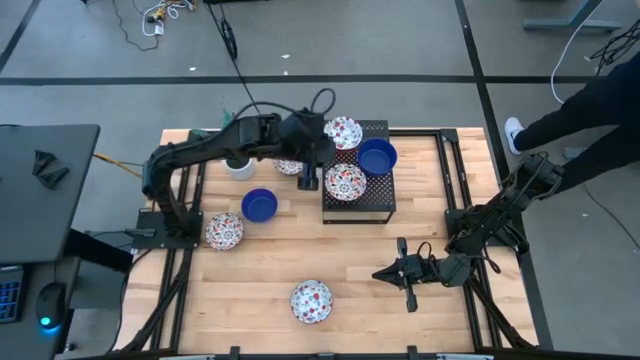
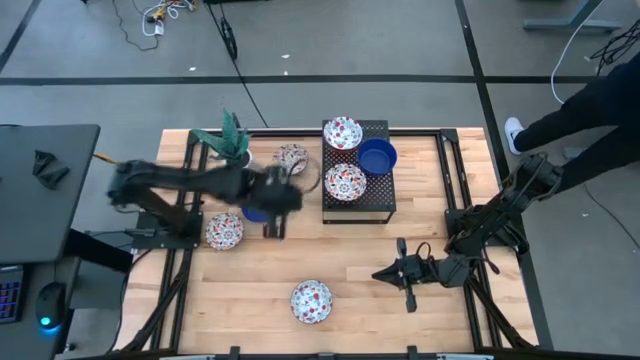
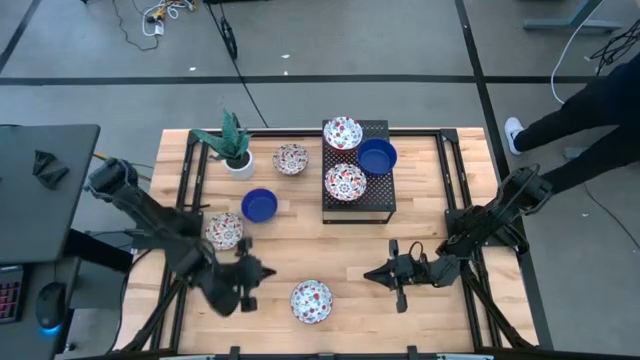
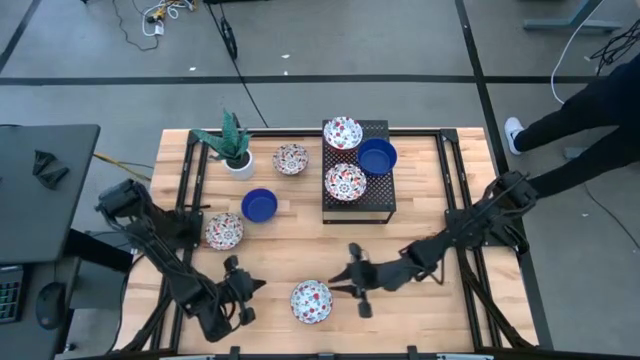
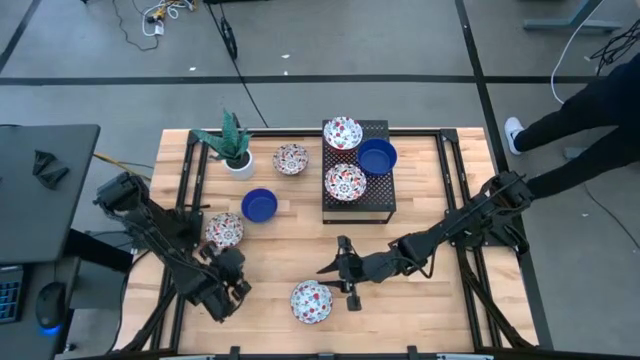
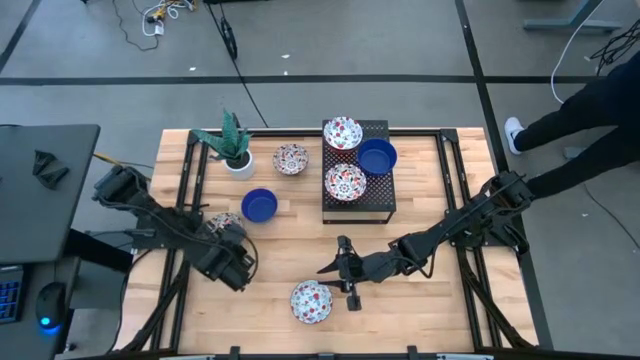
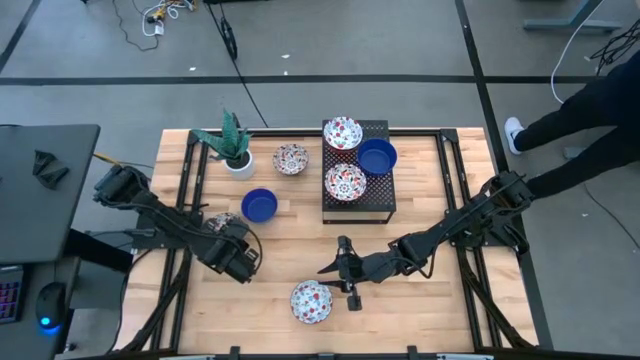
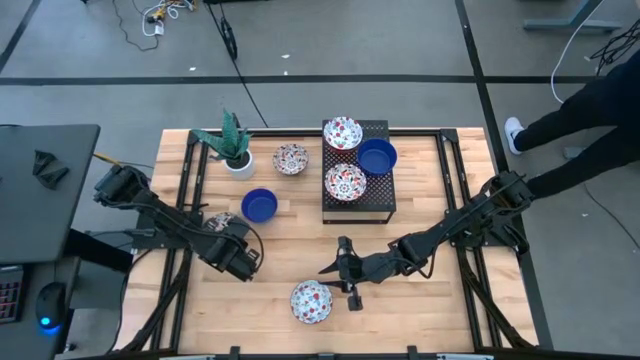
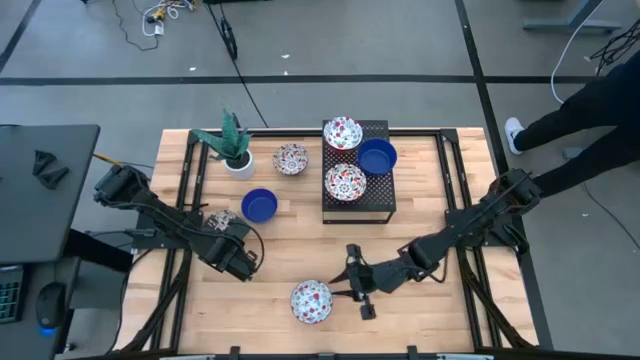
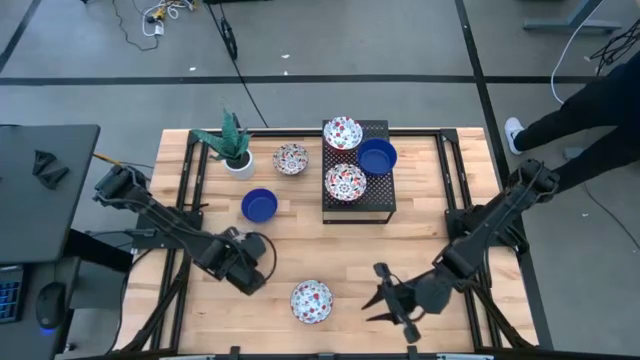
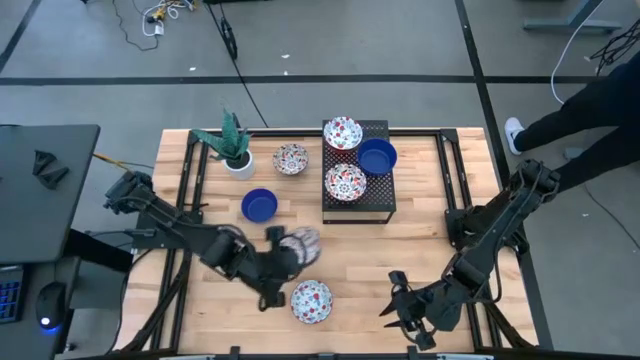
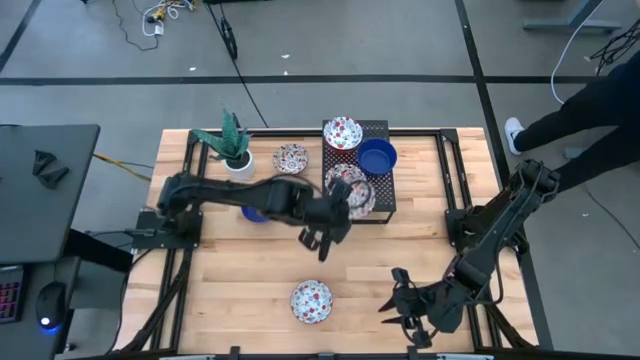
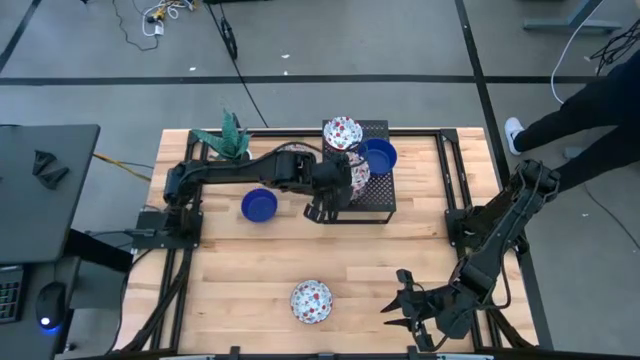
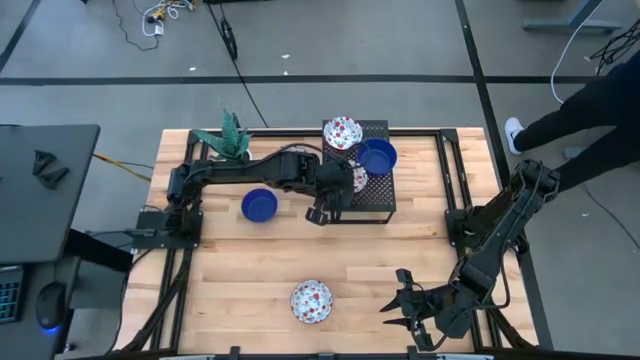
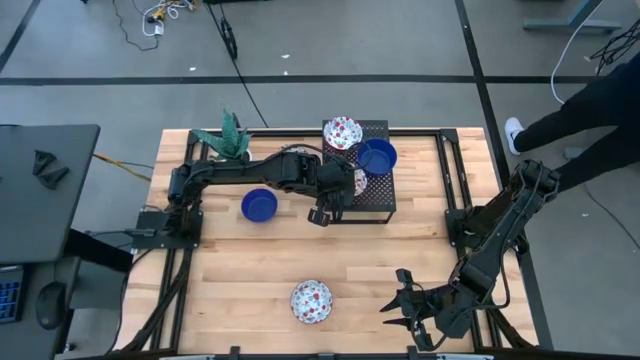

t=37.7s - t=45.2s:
Task: Pick & Place Mini bowls
Stack the bottom orange white bowl on top of the orange and white bowl on the shelf

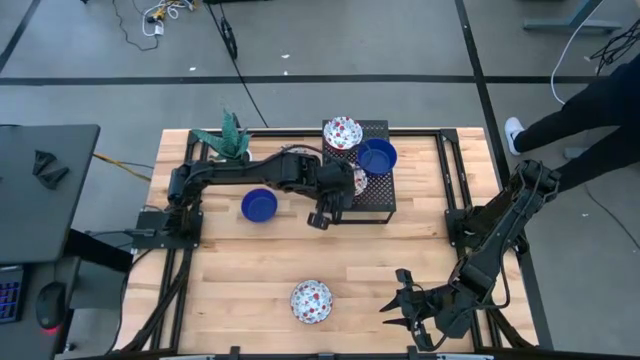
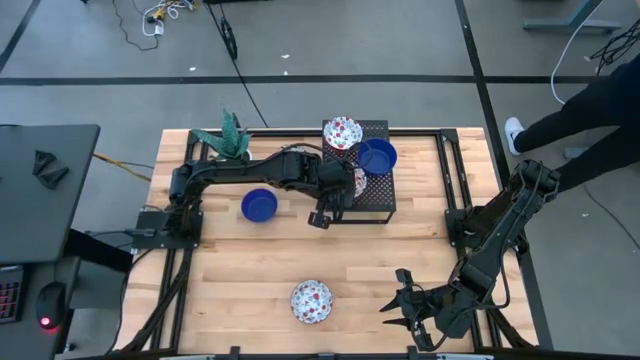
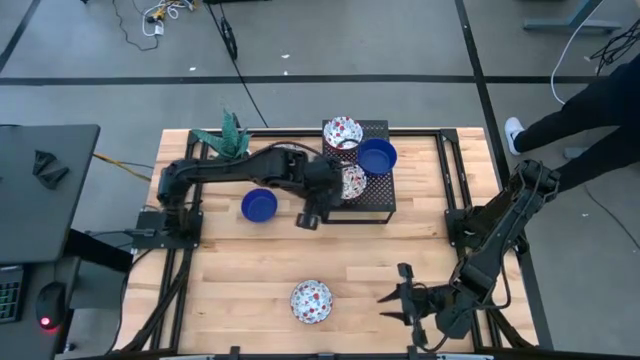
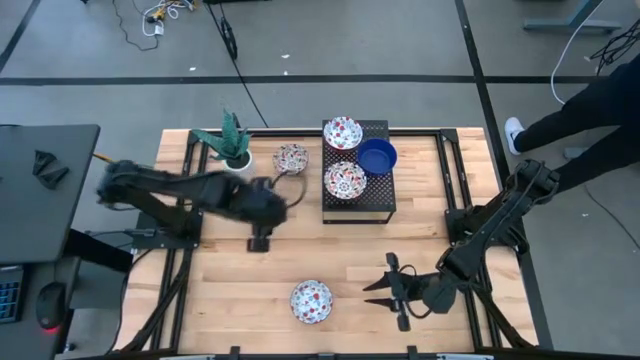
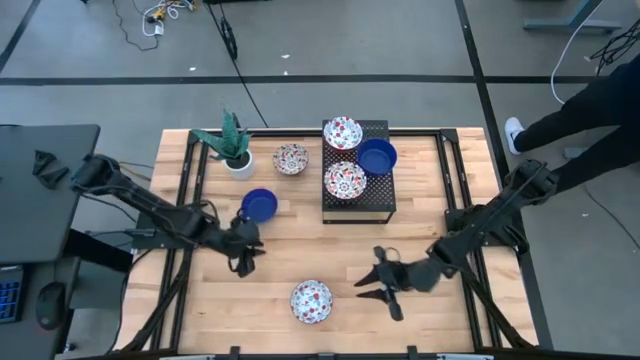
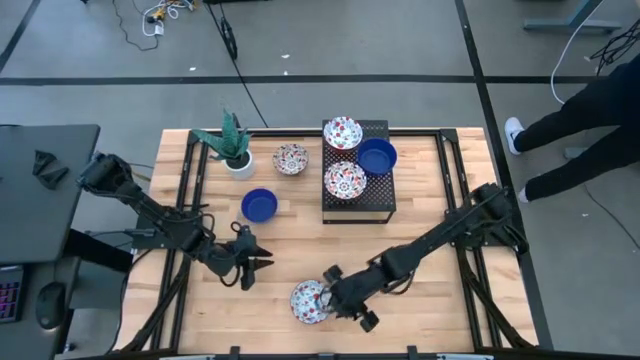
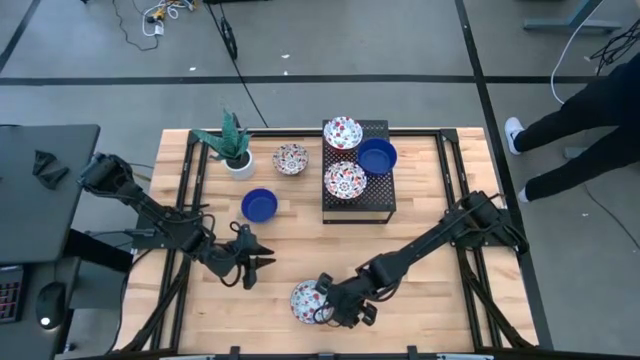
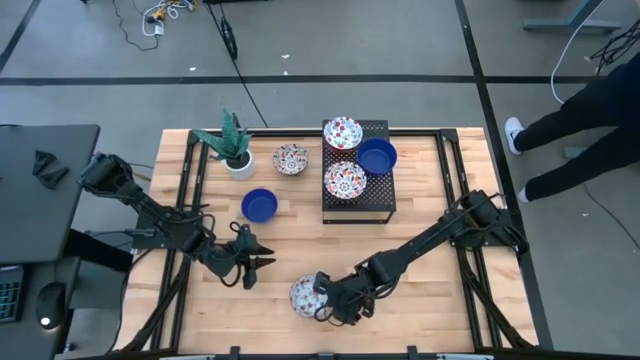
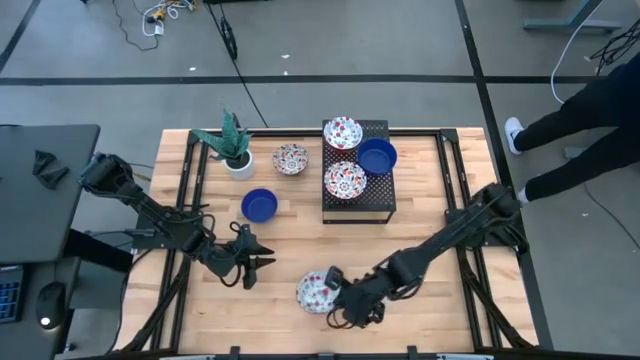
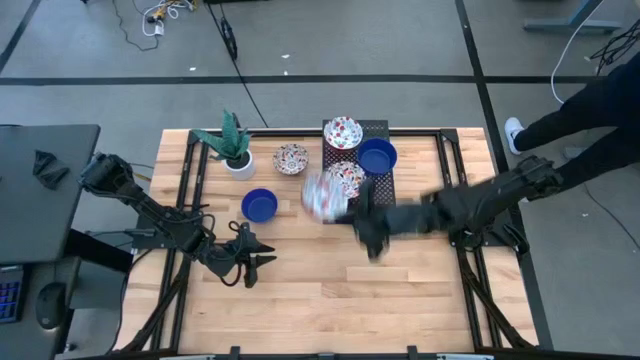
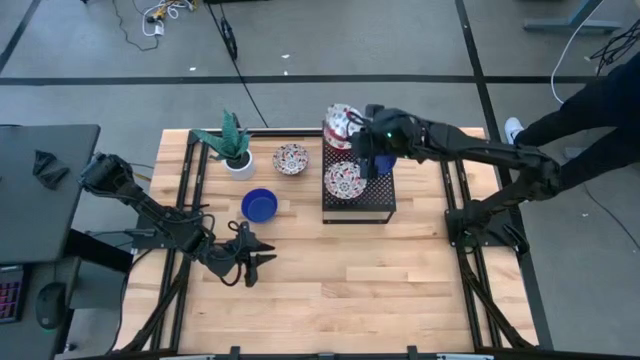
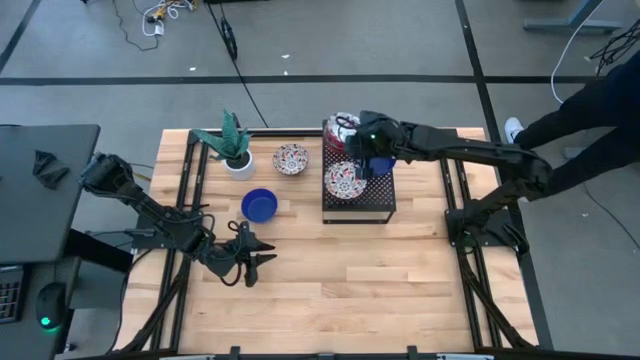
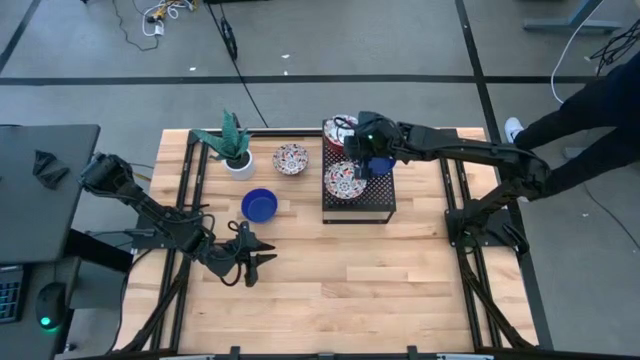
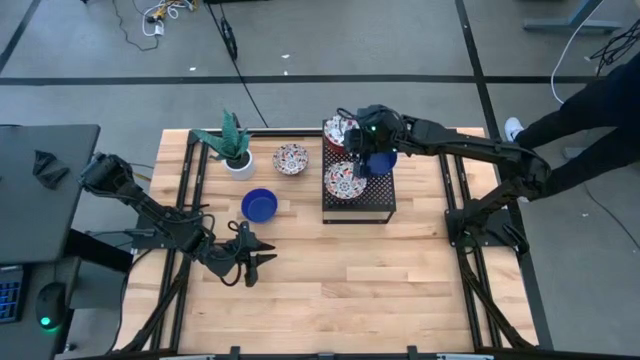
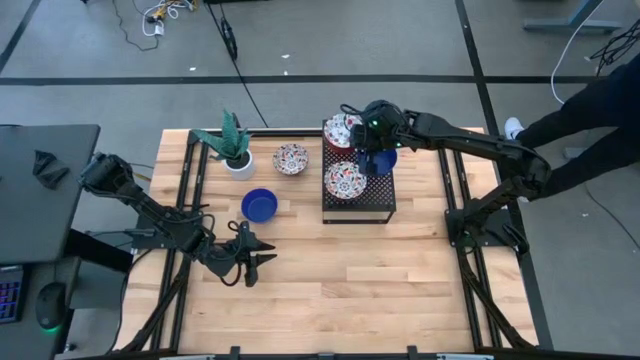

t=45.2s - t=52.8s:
Stack the red white bowl on top of the red and white bowl on the shelf

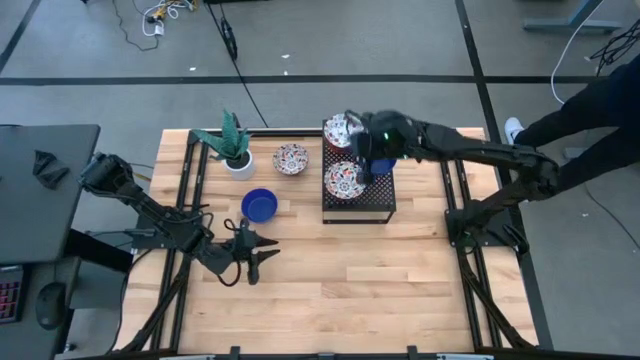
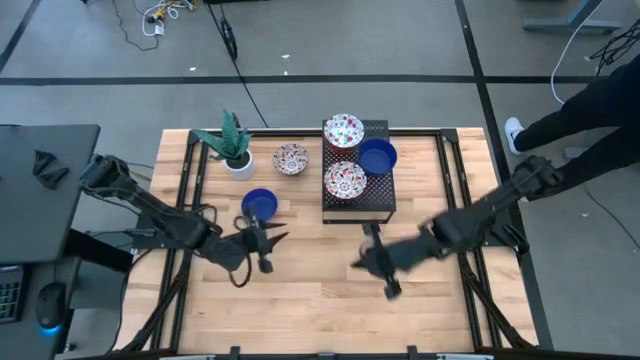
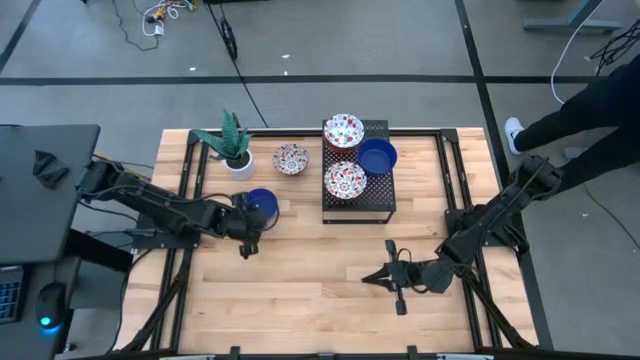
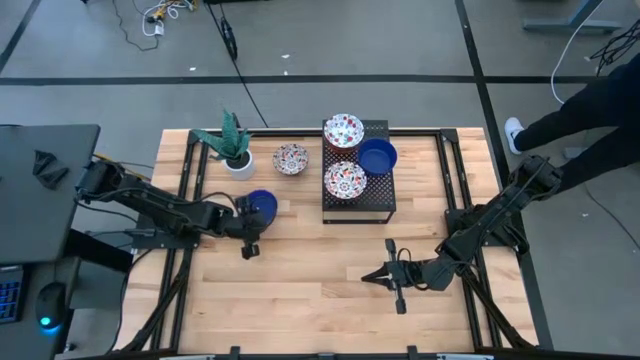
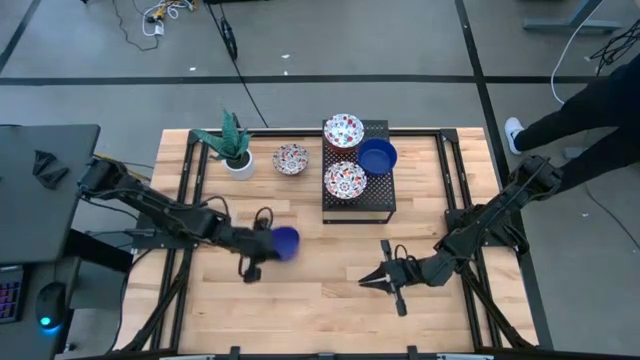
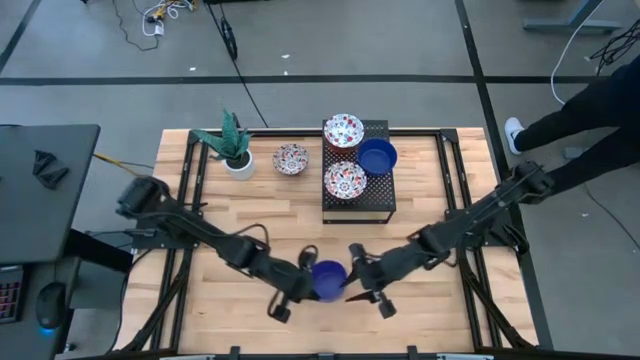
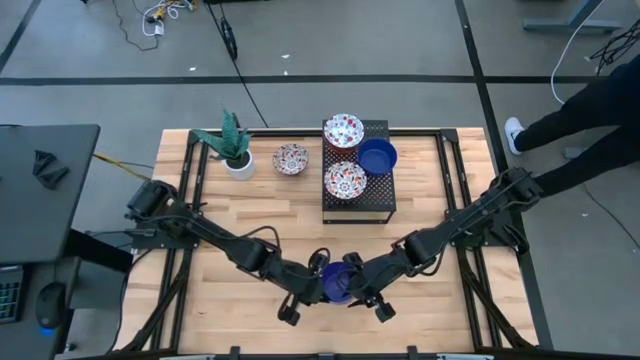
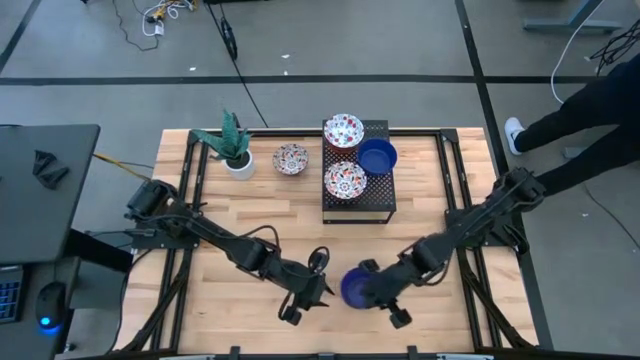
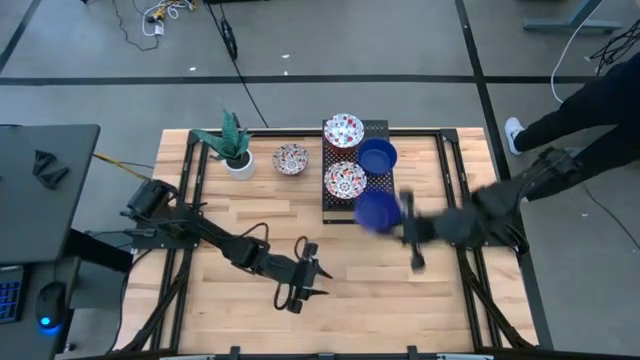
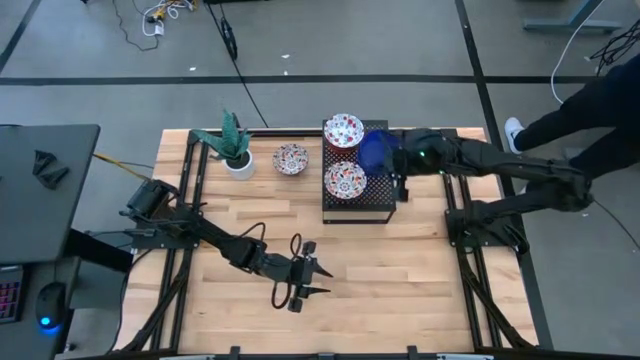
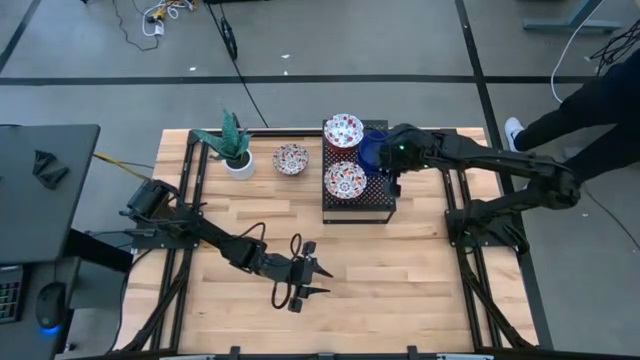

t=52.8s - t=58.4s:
Stack the blue bowl on top of the blue bowl on the shelf

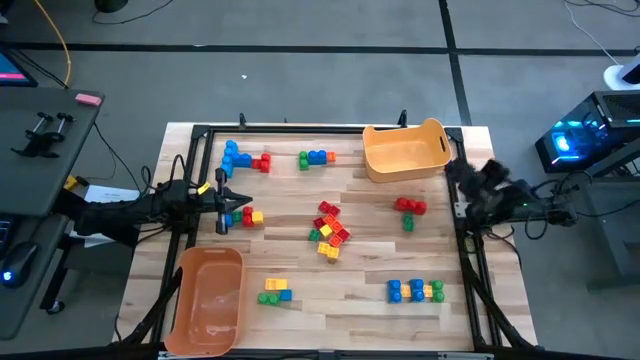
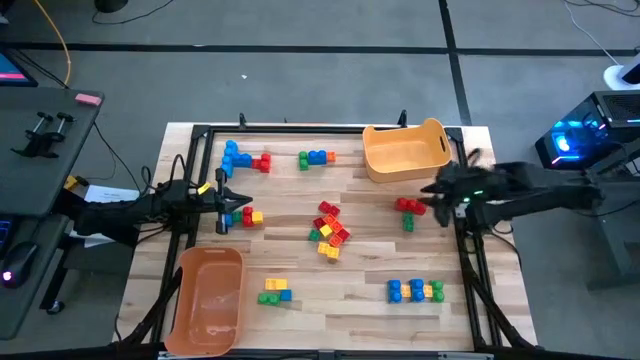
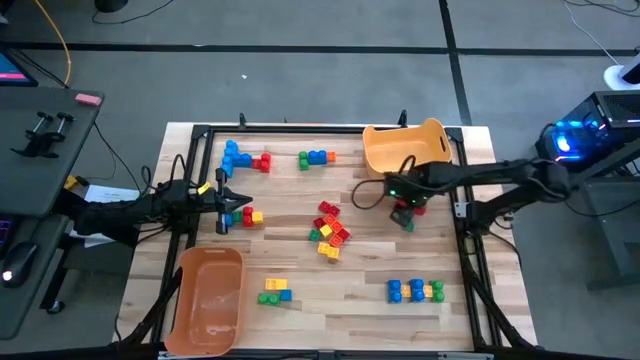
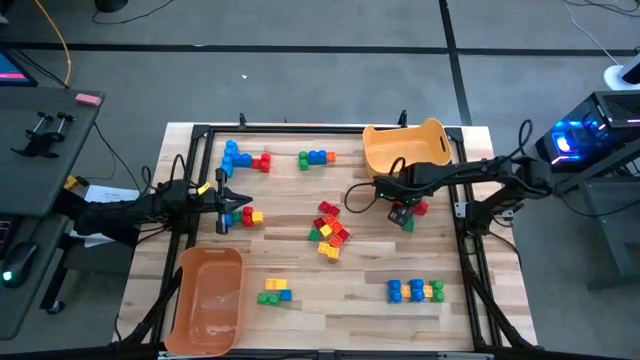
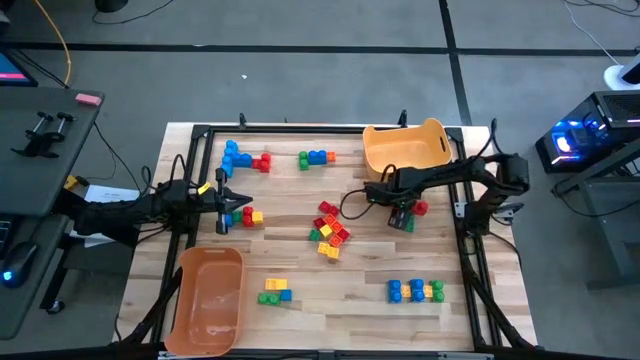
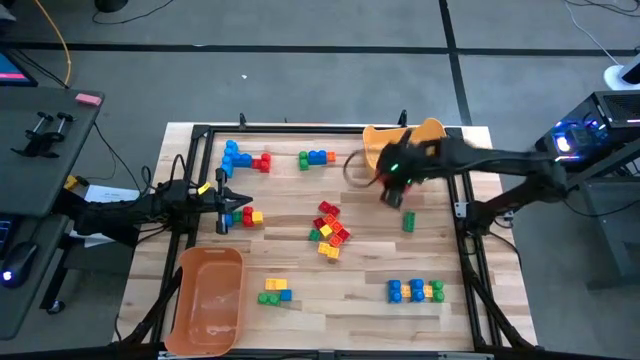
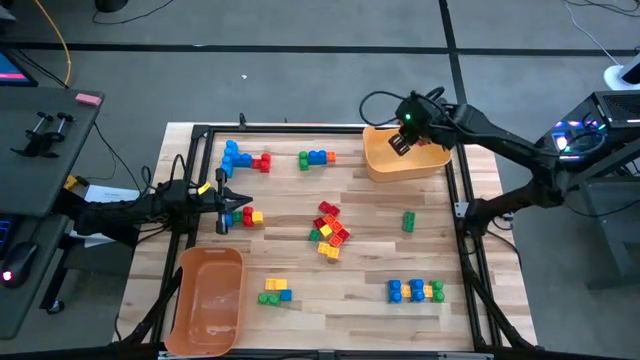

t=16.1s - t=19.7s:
Task: Sort blocks by size
Put the red game piece into the yellow bin
